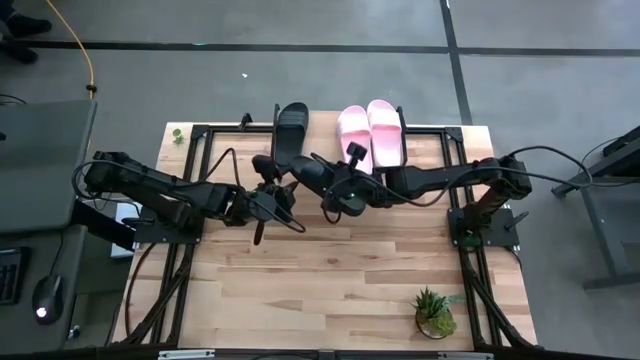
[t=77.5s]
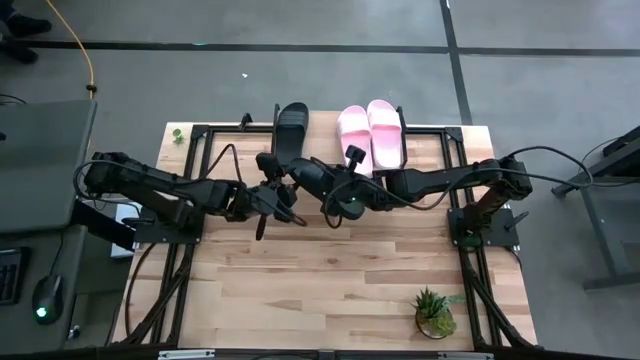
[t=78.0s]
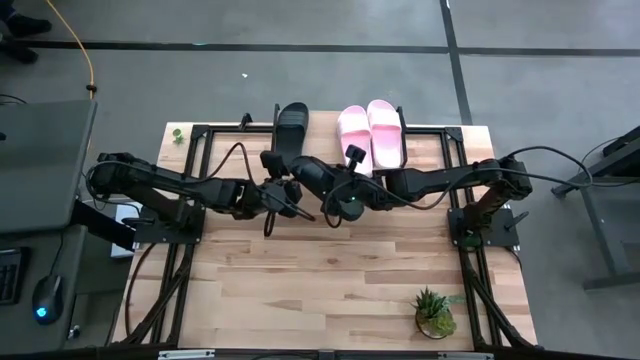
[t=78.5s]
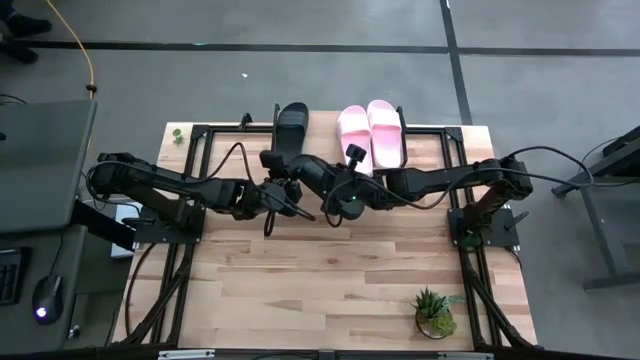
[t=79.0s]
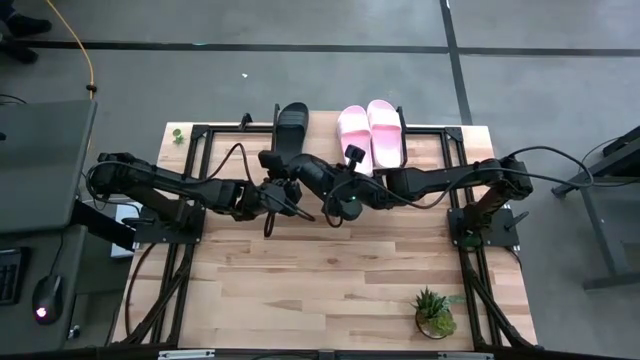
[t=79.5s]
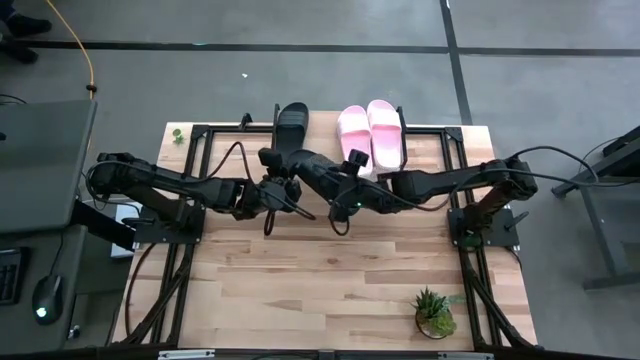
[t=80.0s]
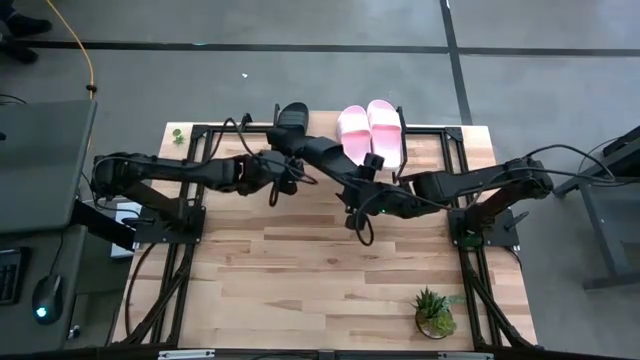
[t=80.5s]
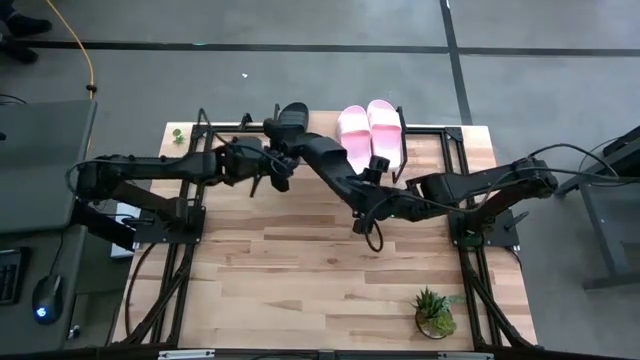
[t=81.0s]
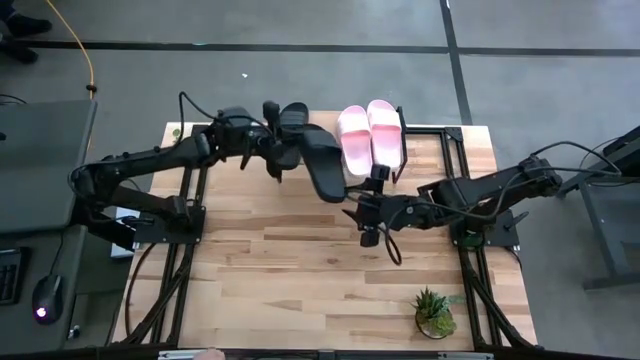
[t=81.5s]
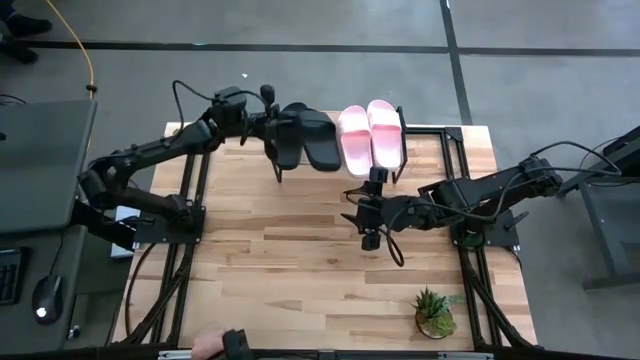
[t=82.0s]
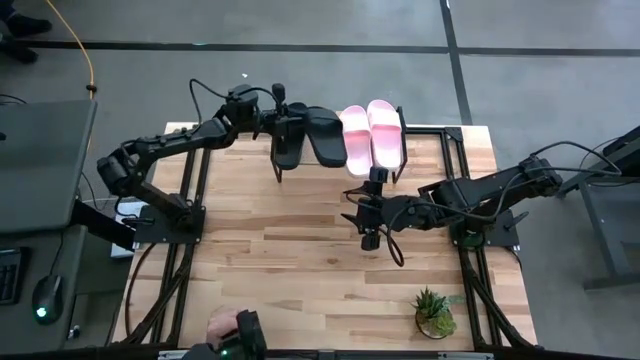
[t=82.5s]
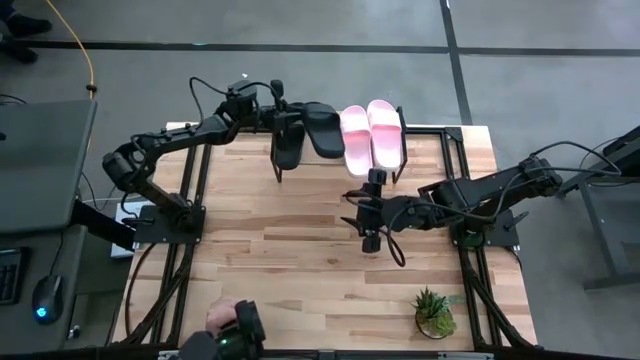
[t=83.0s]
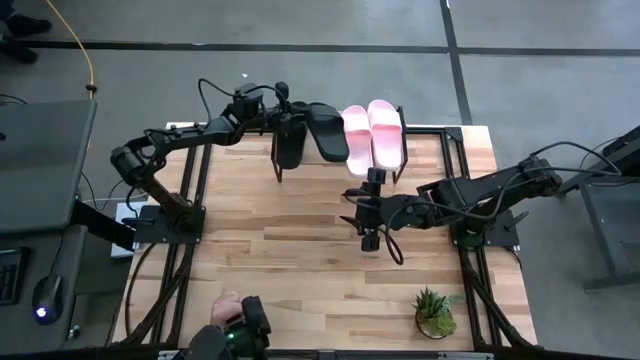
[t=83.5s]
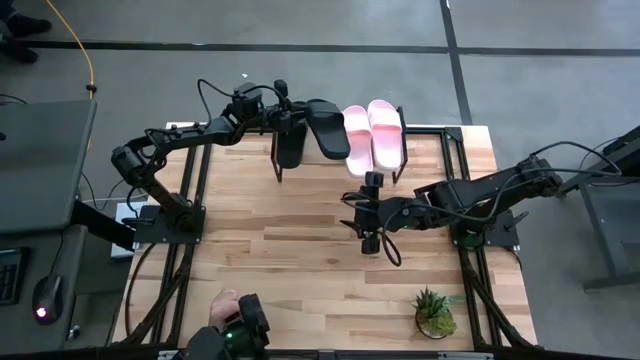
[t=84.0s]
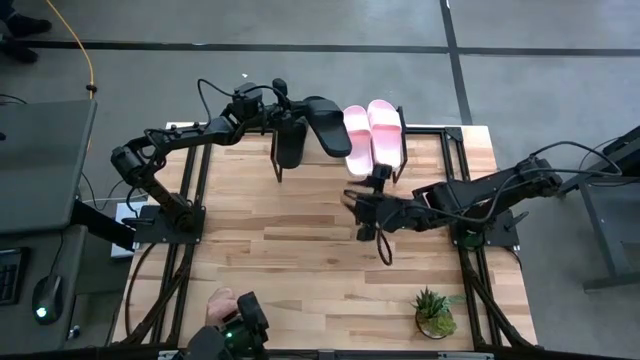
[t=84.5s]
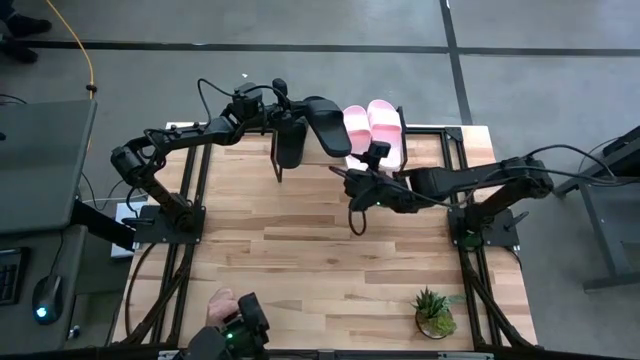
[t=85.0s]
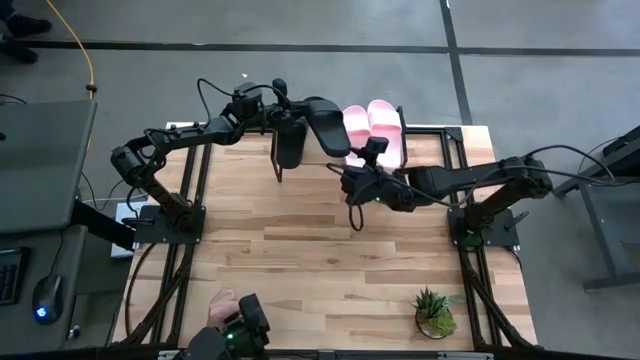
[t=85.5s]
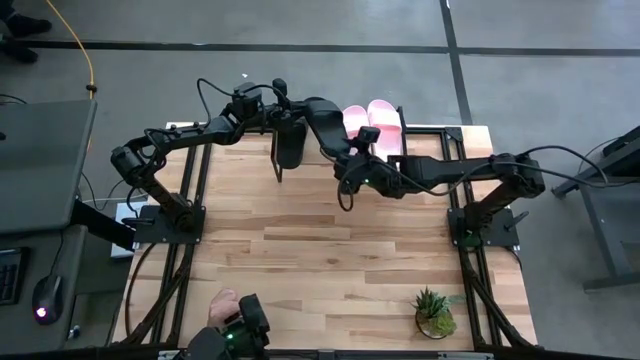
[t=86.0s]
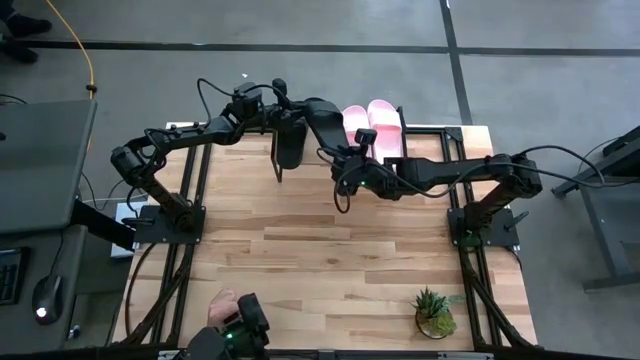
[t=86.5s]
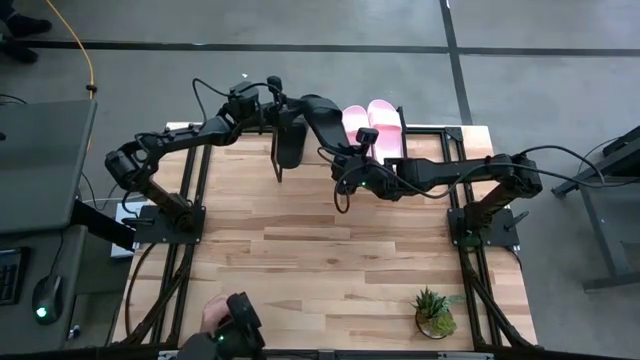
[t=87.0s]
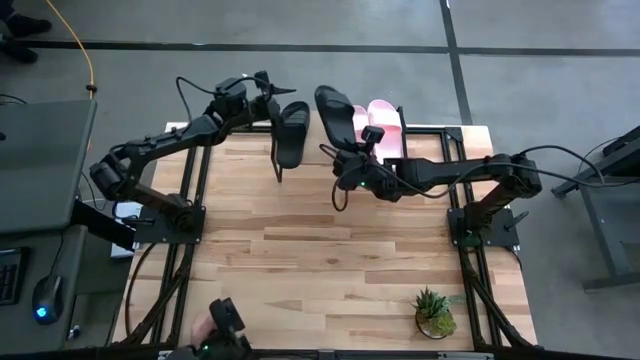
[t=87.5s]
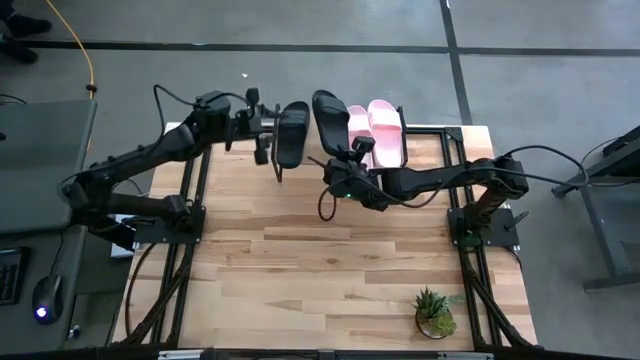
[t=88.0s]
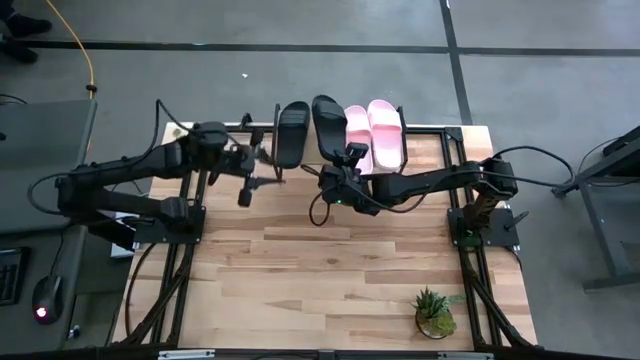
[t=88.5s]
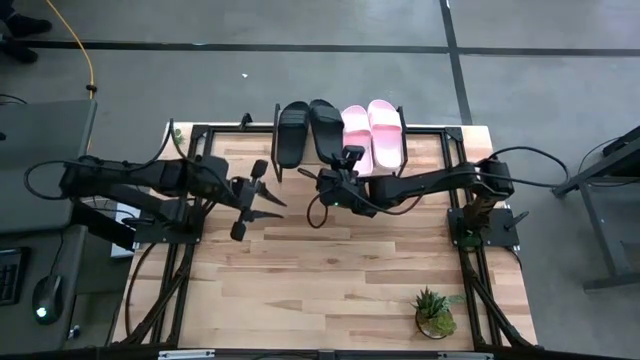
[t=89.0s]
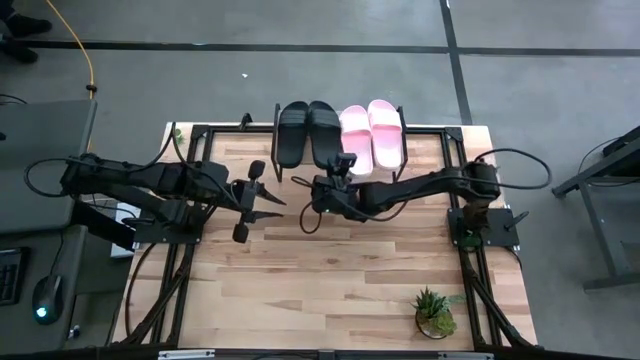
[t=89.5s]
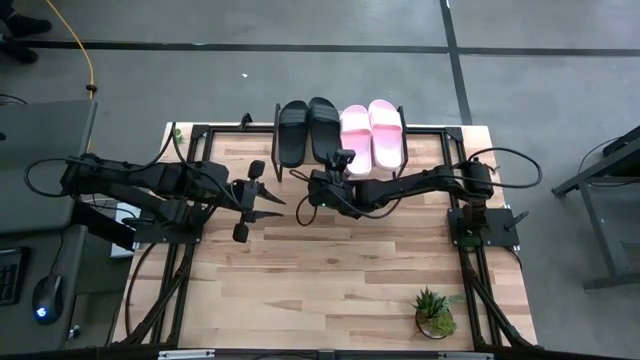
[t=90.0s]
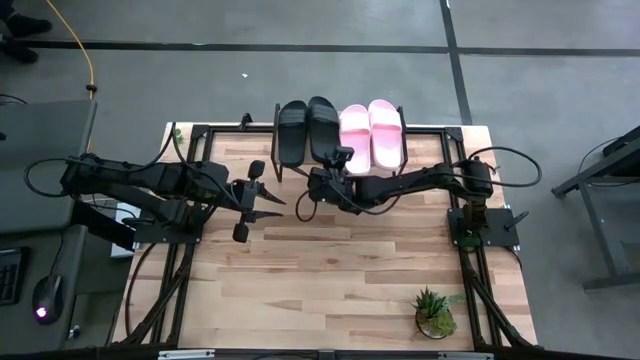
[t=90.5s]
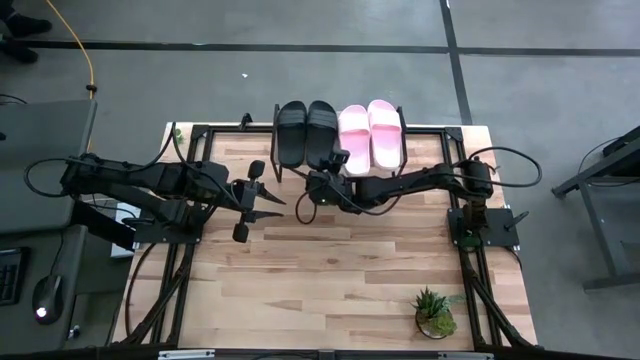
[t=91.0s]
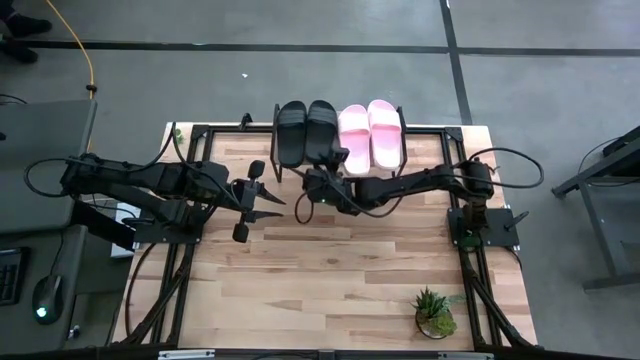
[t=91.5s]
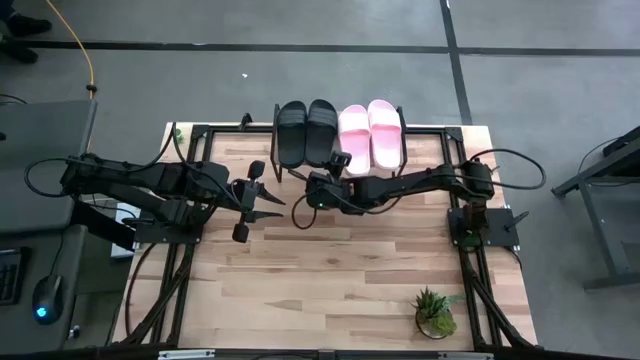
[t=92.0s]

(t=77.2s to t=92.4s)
Task: Pick and place slides into the shelf
Put the black slides on the shelf

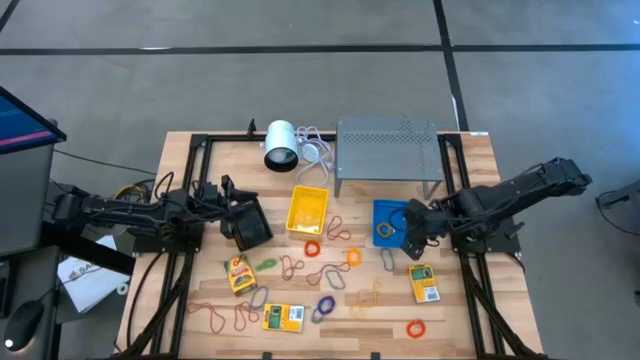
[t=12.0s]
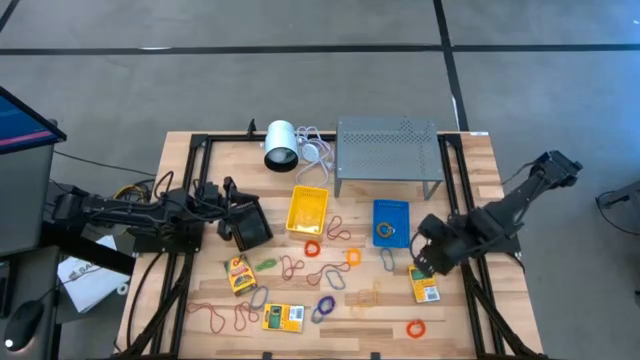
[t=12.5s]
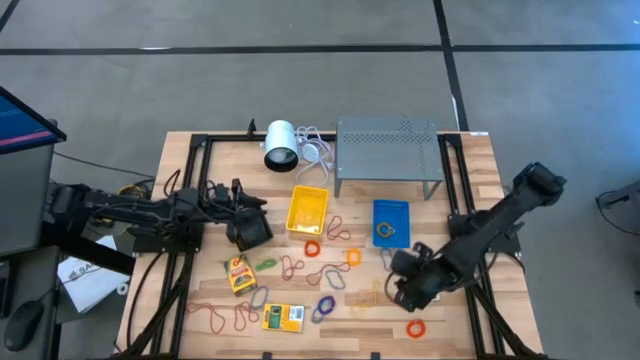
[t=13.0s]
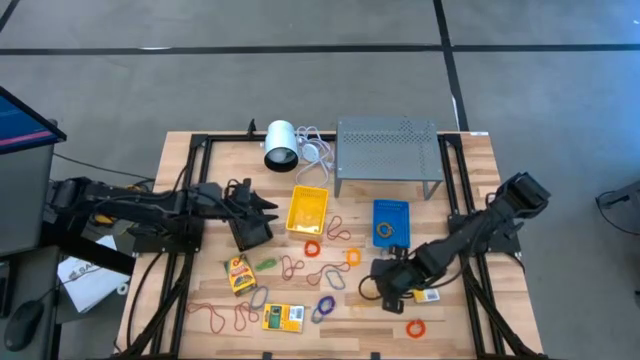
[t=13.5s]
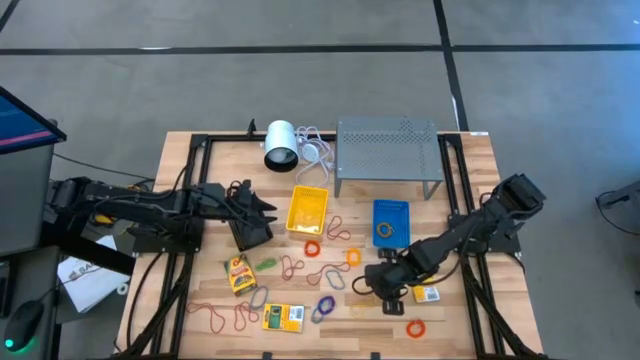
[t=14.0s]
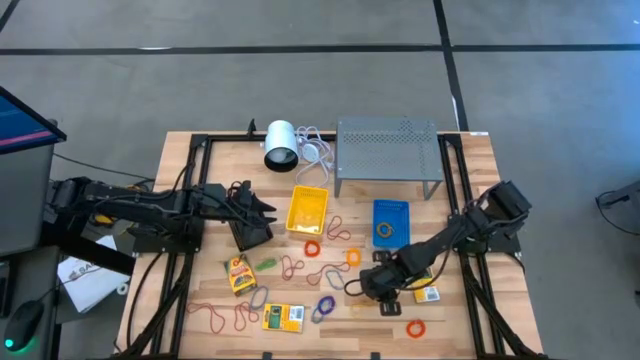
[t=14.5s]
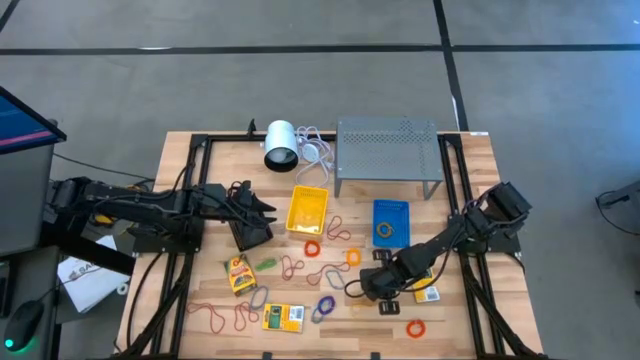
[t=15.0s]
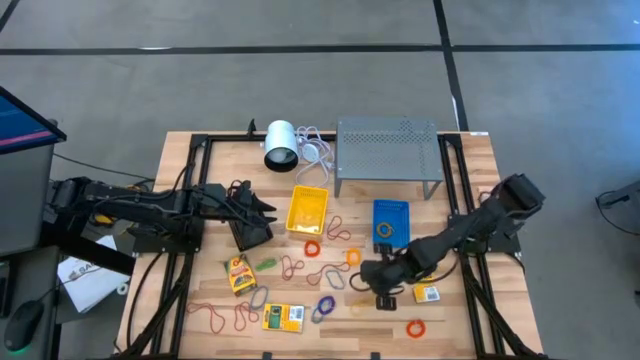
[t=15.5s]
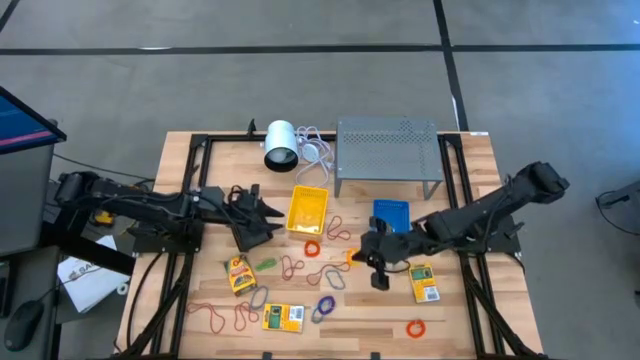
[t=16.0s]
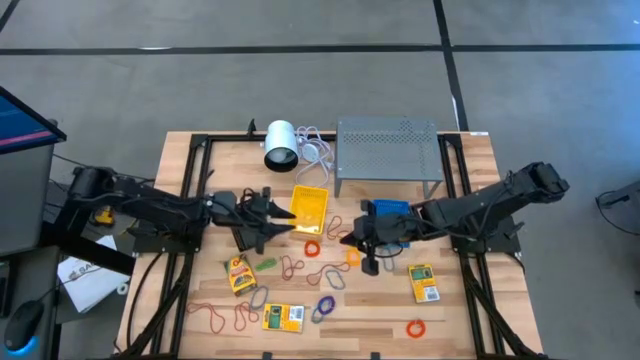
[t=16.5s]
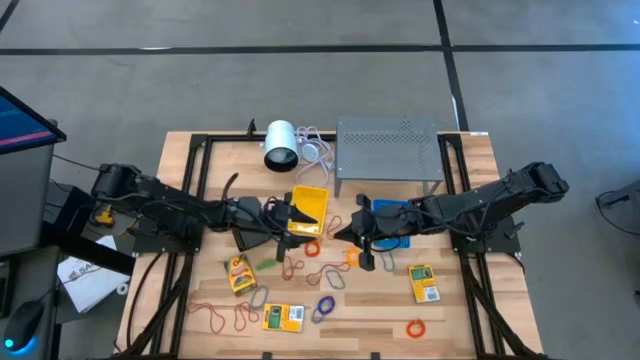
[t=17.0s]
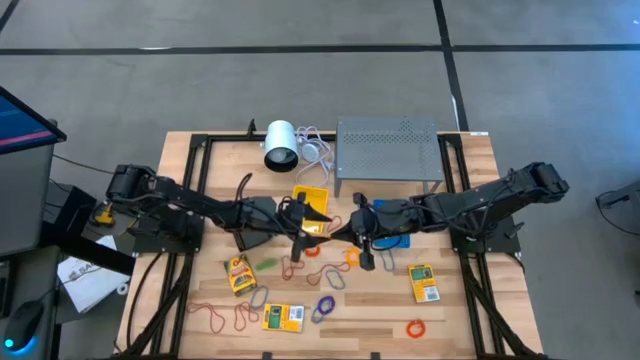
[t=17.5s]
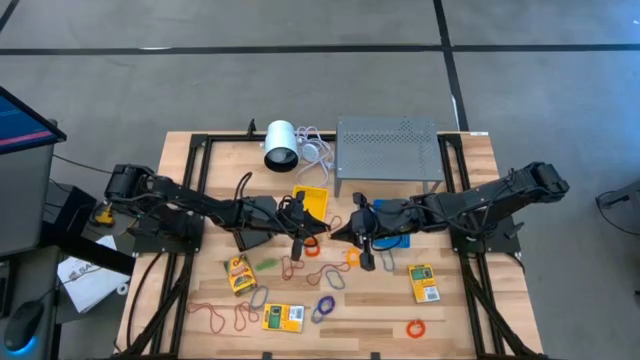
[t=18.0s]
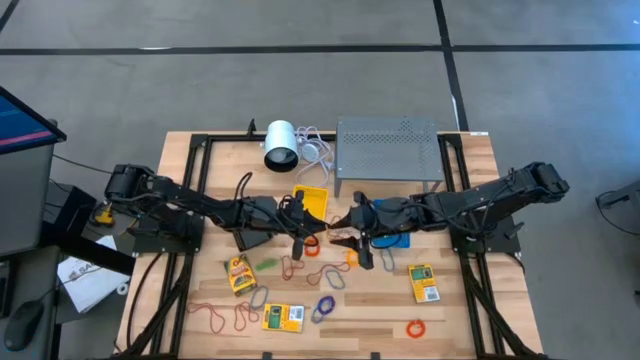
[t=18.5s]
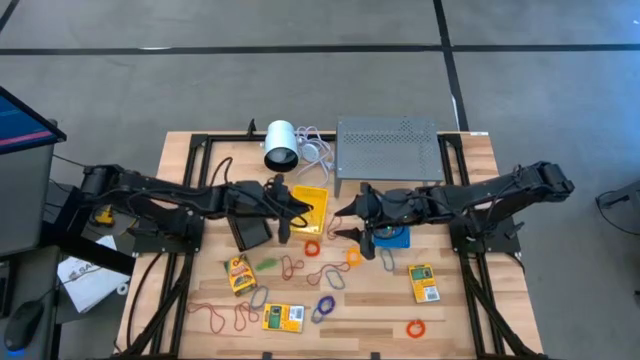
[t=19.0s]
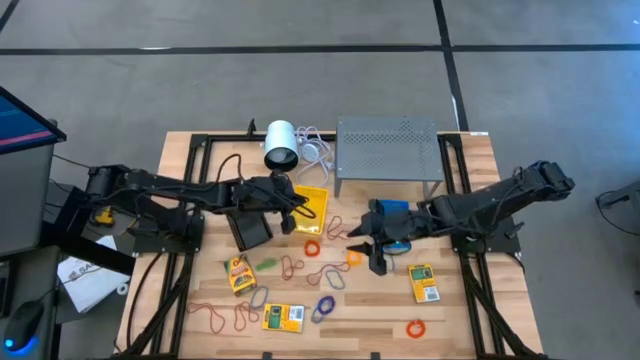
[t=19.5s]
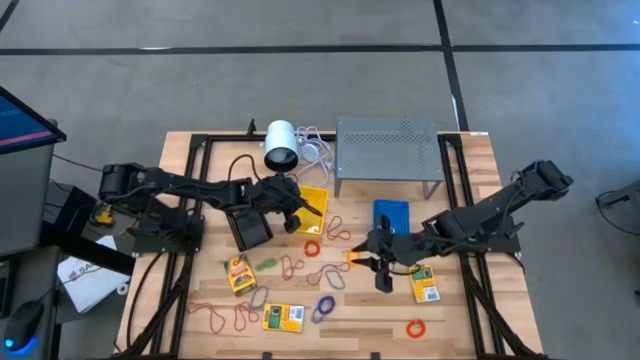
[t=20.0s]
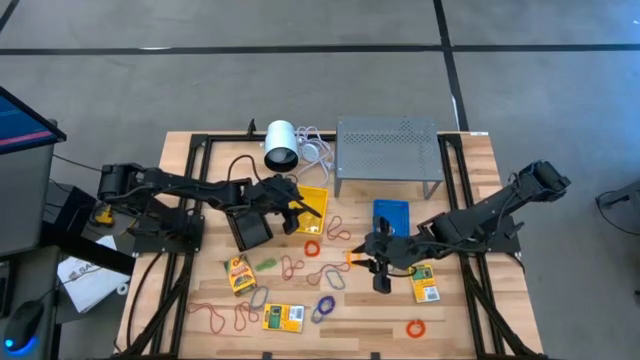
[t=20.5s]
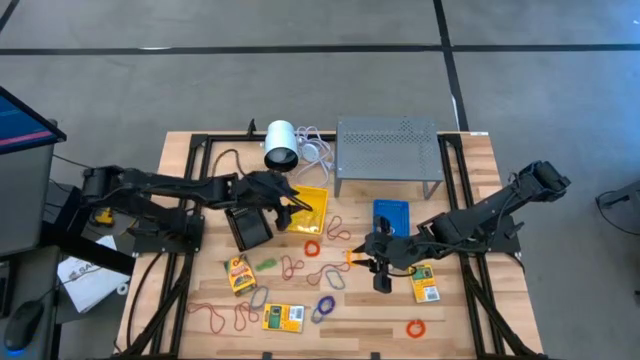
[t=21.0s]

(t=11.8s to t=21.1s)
Task: Pick & Place Office Desk Supplies
Put the yellow rubber band into the yellow basket
